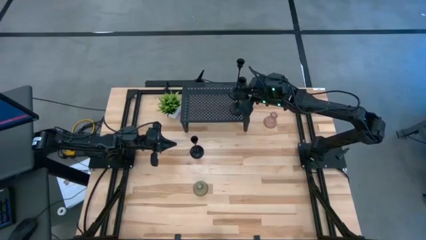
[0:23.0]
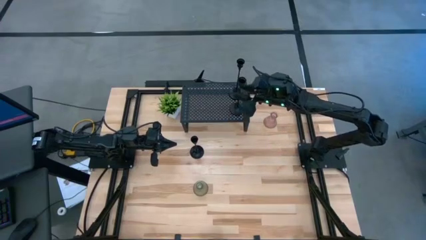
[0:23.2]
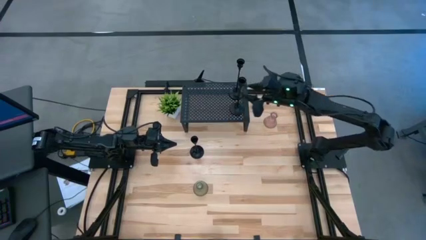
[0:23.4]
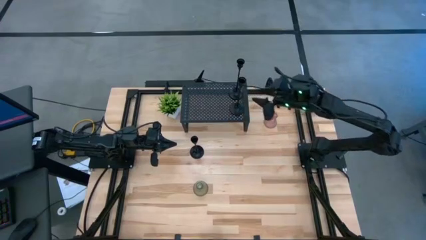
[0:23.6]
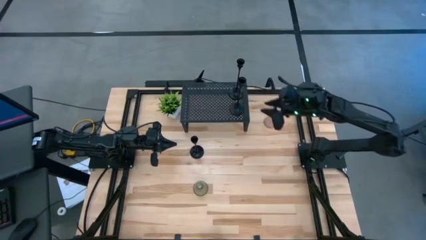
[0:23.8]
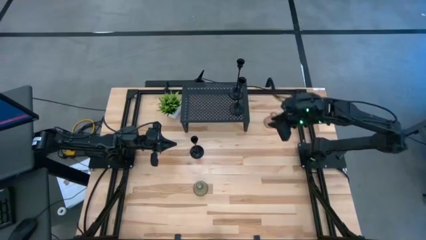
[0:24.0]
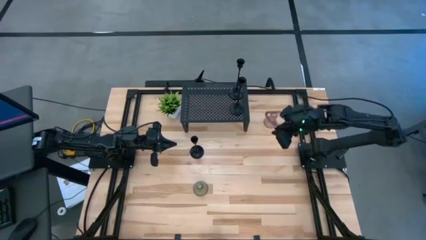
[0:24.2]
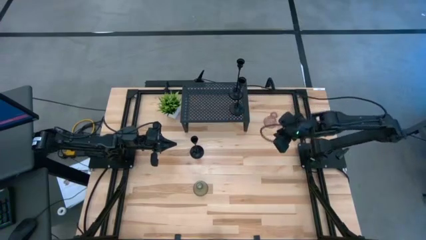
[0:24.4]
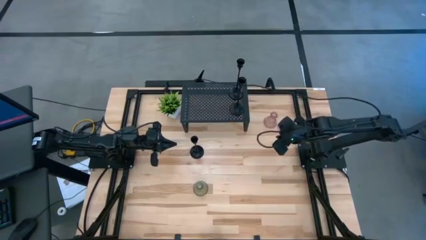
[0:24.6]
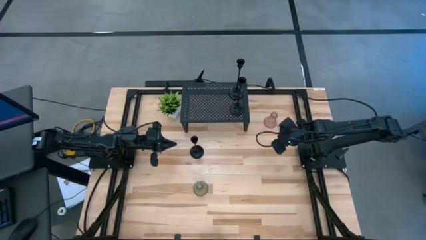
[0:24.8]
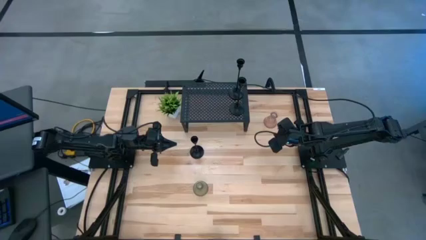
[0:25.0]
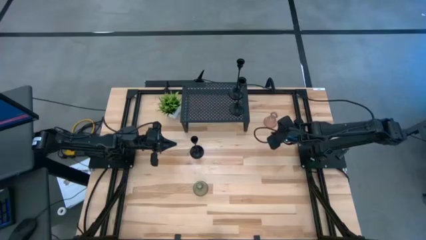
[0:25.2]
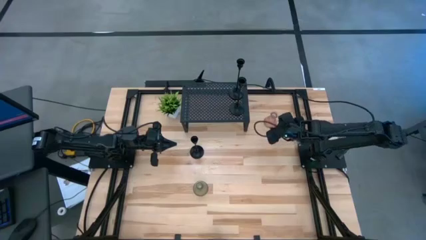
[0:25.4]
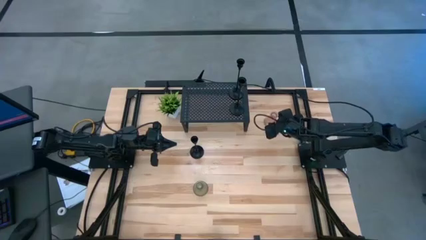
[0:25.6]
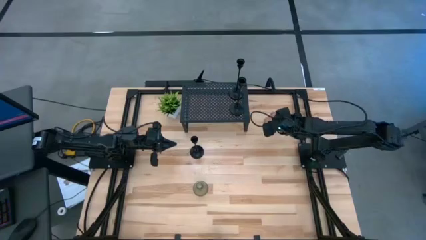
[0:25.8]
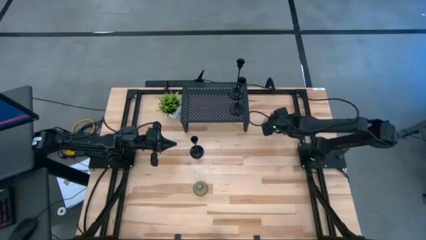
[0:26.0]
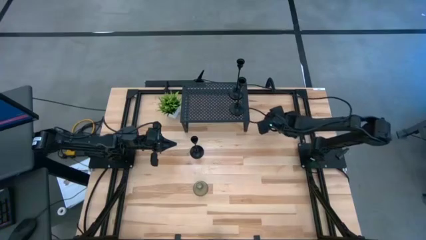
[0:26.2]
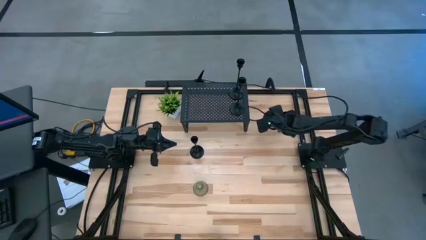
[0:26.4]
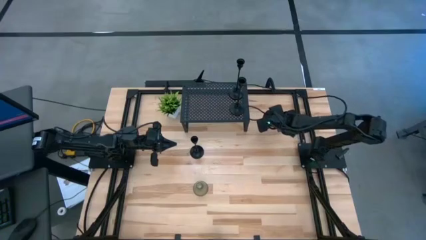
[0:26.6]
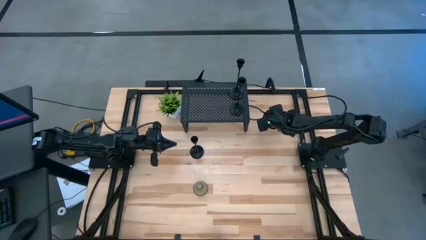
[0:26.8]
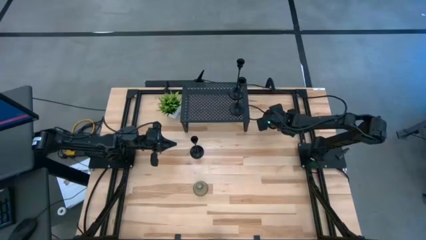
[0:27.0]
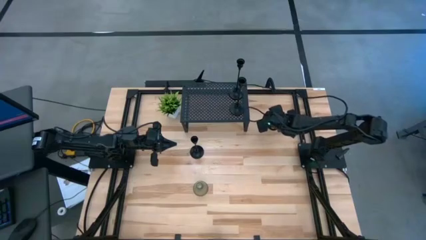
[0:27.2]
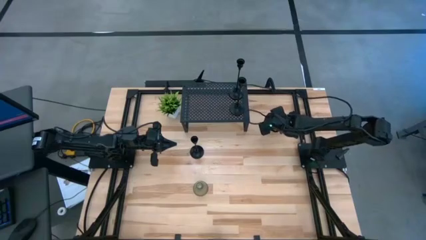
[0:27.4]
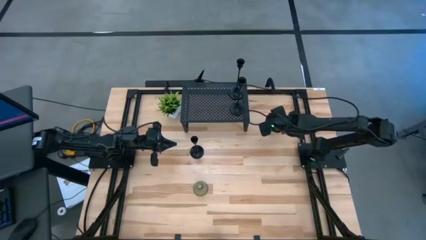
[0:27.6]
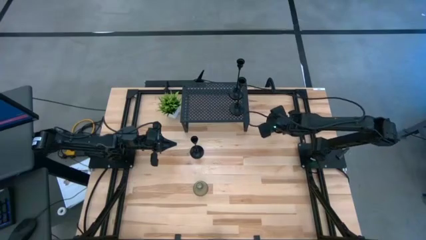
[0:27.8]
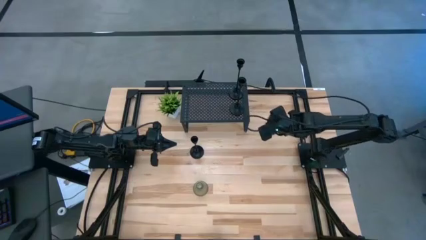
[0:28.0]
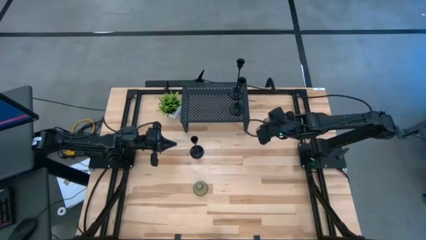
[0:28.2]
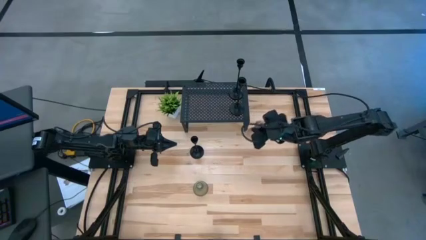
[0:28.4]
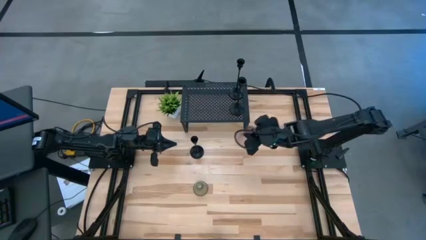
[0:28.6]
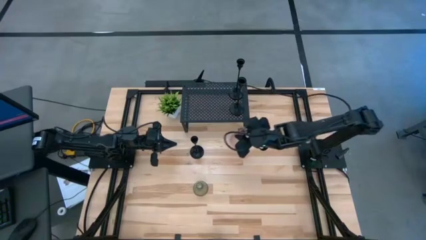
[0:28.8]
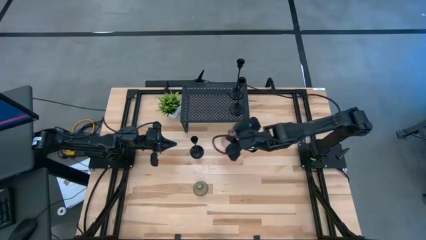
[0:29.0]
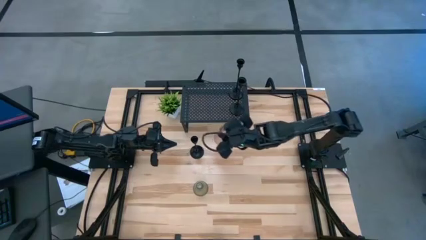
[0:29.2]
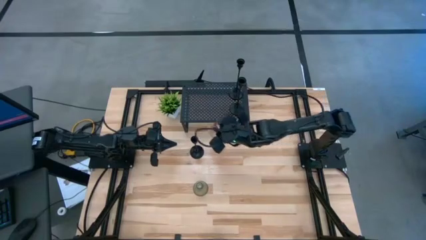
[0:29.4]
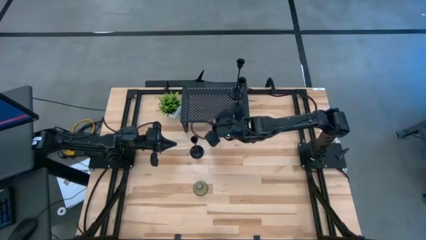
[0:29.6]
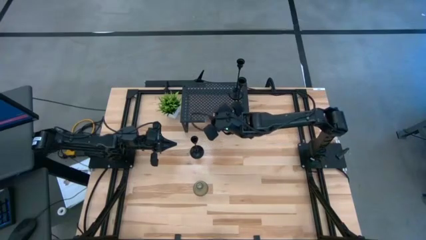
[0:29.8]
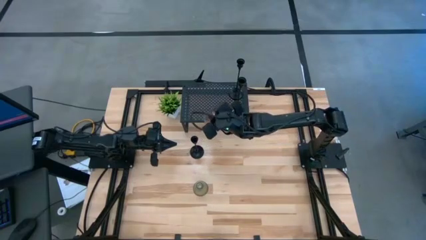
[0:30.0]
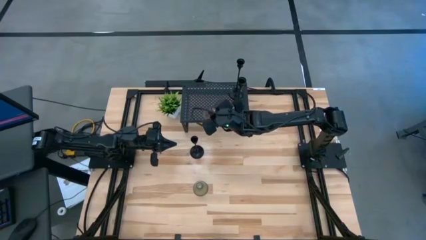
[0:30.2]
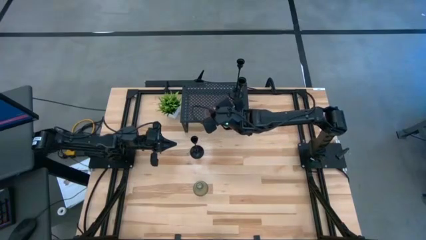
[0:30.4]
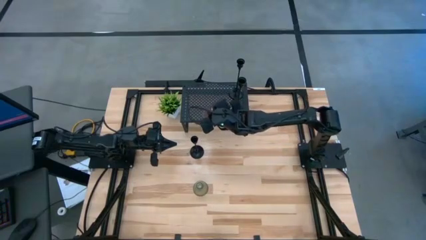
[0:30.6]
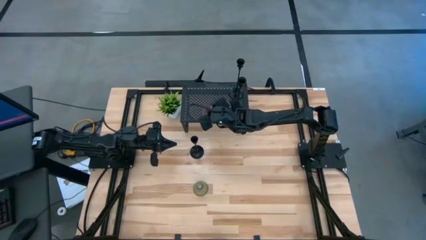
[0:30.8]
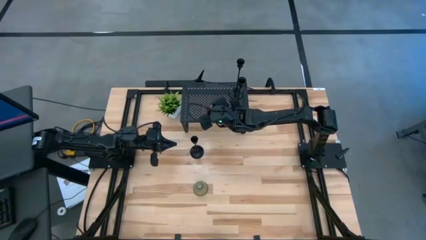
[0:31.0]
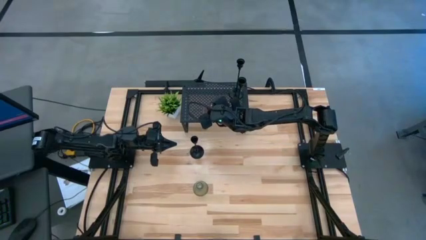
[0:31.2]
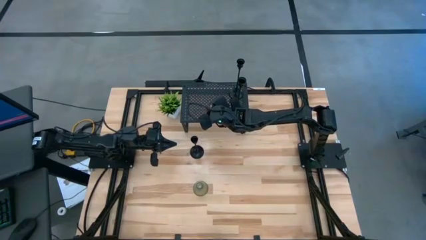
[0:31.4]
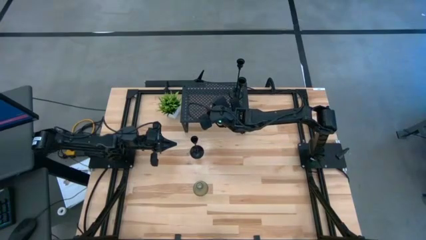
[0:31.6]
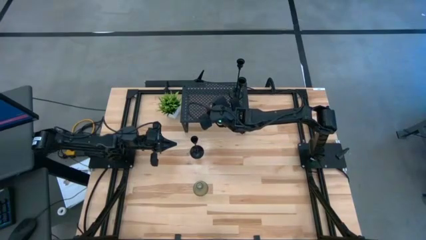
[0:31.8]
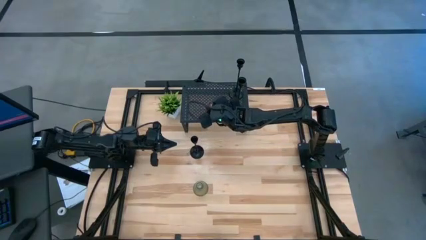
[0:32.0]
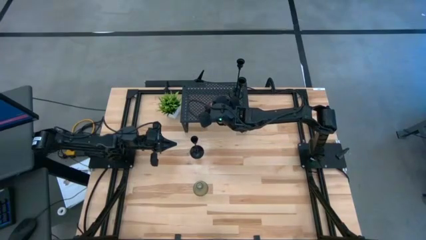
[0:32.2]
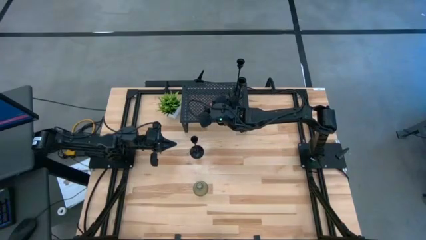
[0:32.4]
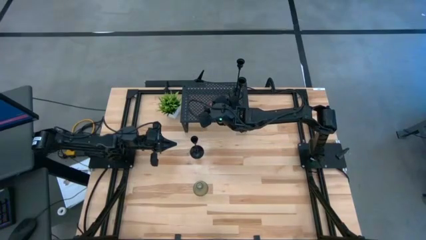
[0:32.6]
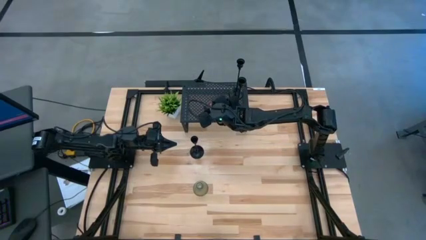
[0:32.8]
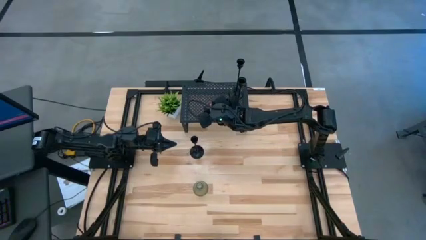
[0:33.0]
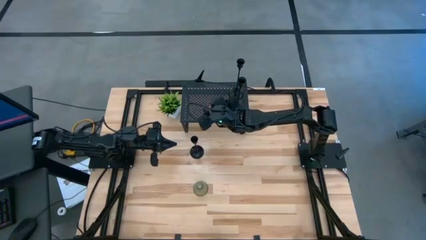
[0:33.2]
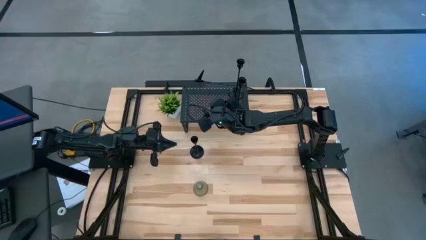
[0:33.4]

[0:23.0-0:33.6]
Task: Pick & Place candle stick holders
Put the pink glass candle holder on the shelf
